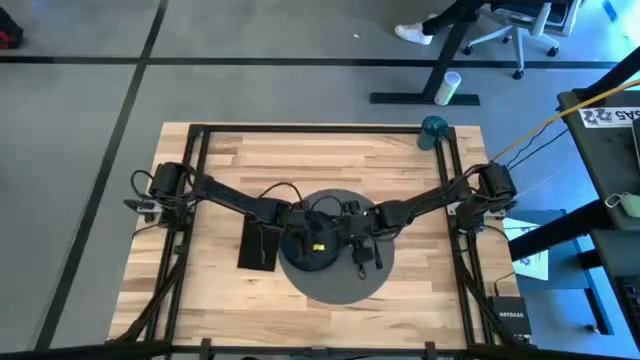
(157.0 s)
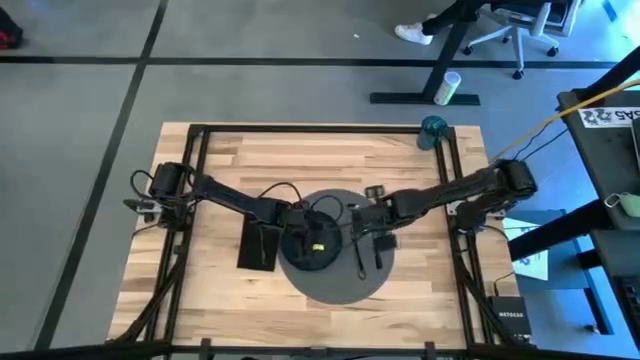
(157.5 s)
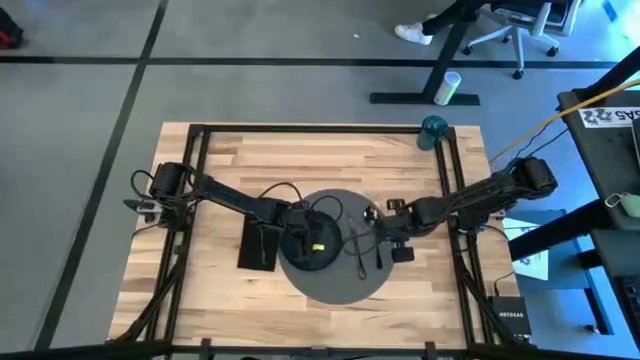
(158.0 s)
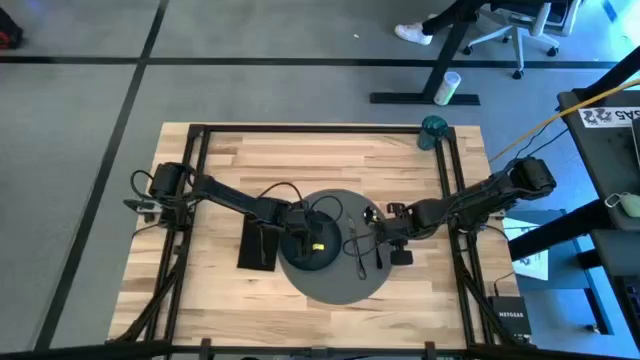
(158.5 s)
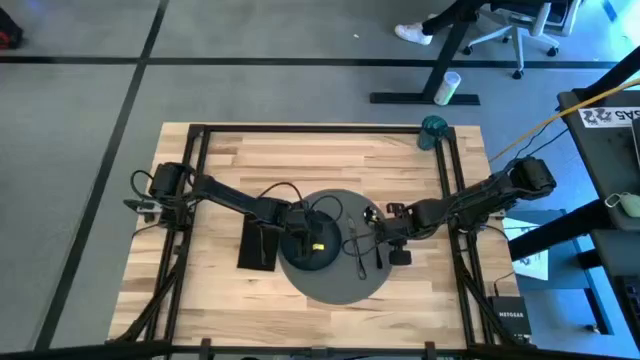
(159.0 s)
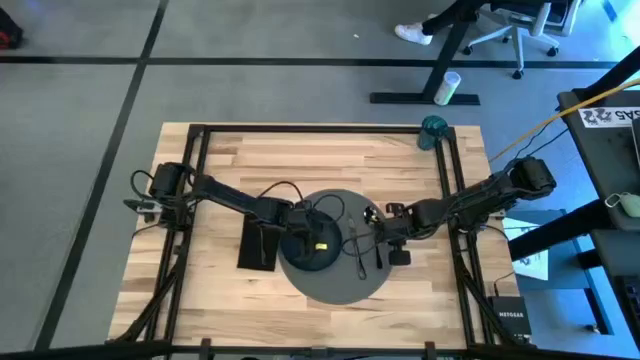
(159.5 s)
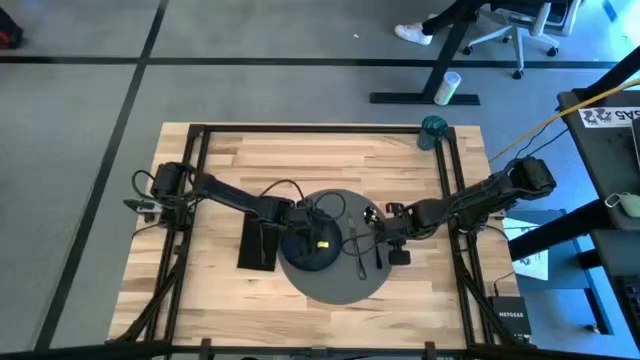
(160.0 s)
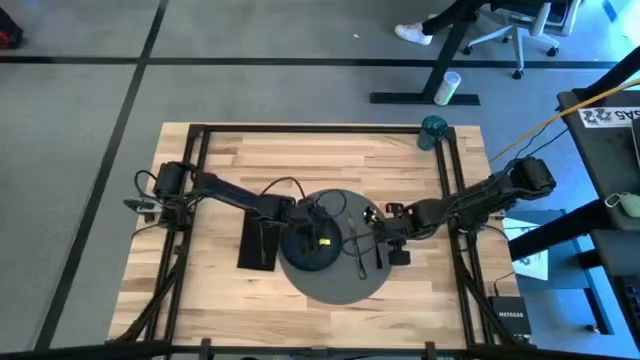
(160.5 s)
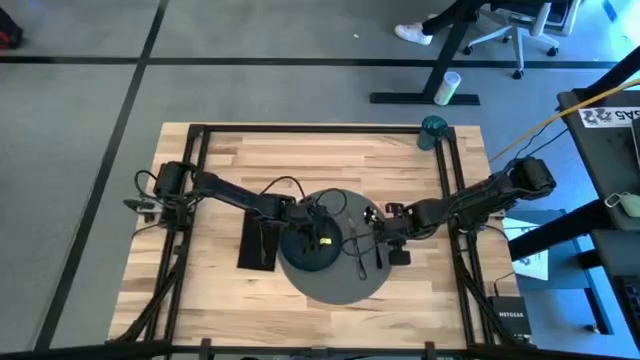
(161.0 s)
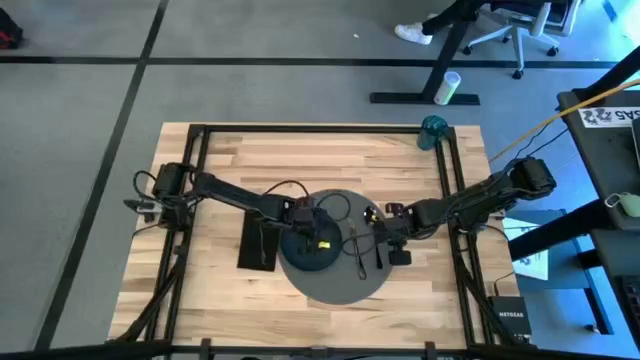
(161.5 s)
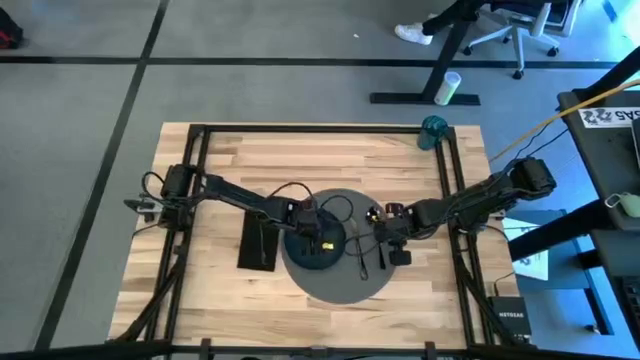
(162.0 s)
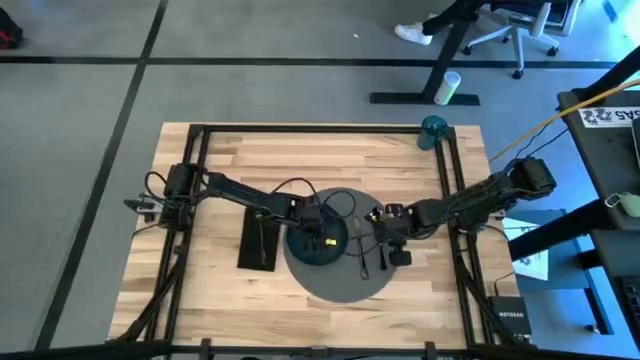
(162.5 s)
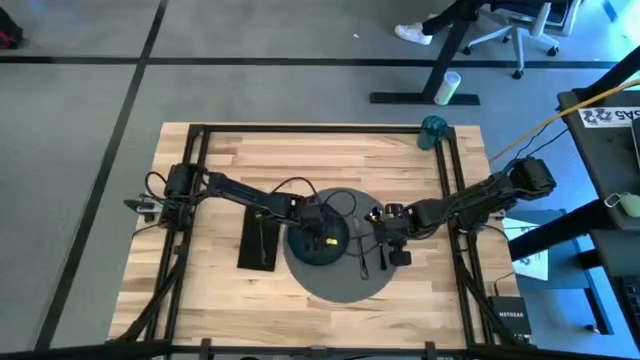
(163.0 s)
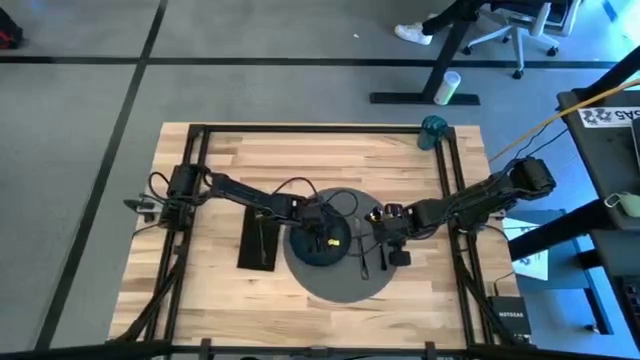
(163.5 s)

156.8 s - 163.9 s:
Task: Set table place
Adjust the dark blue plate on the gray table mat

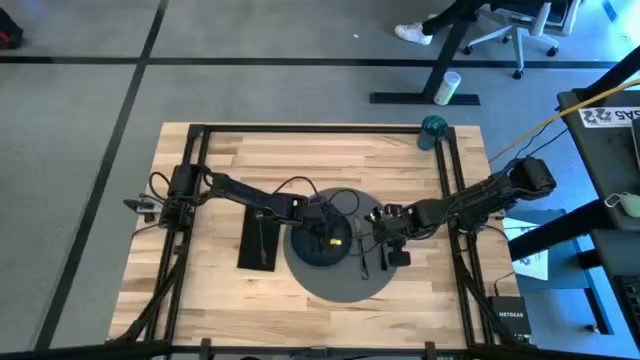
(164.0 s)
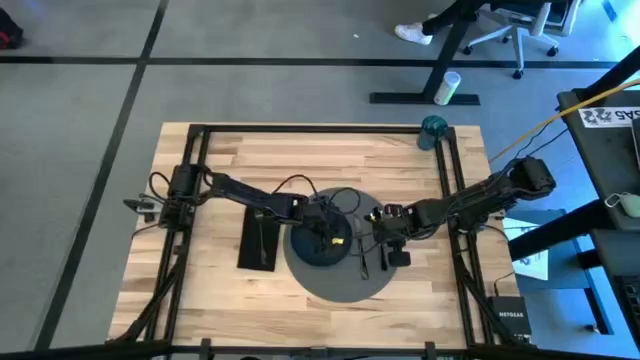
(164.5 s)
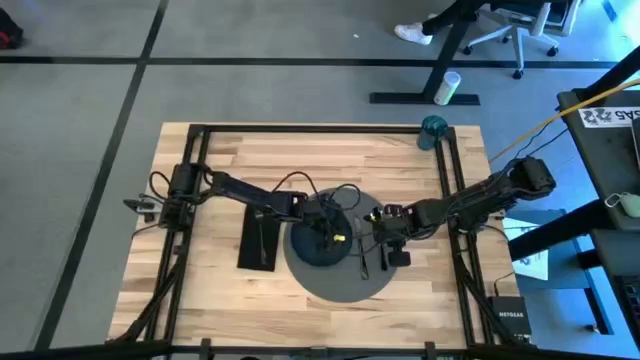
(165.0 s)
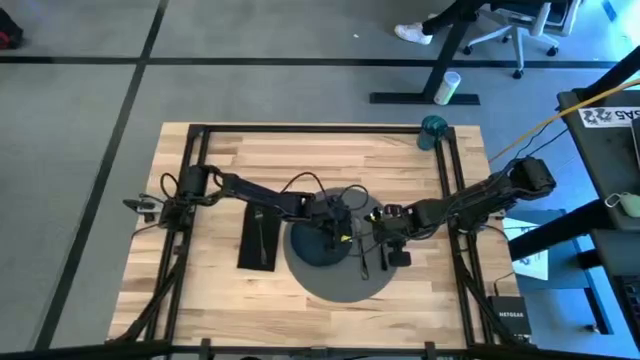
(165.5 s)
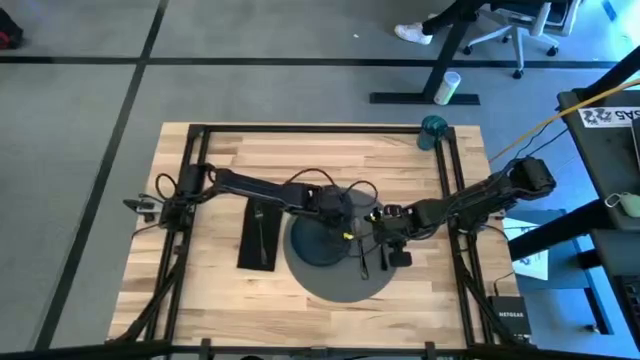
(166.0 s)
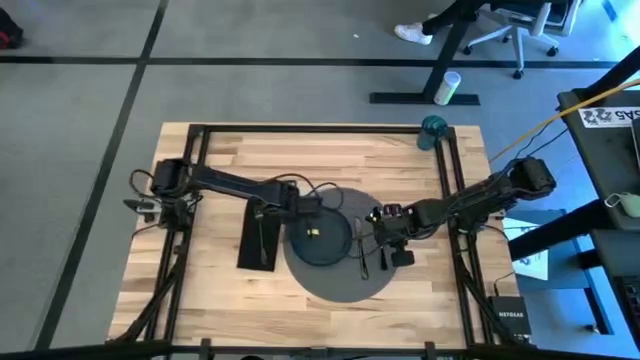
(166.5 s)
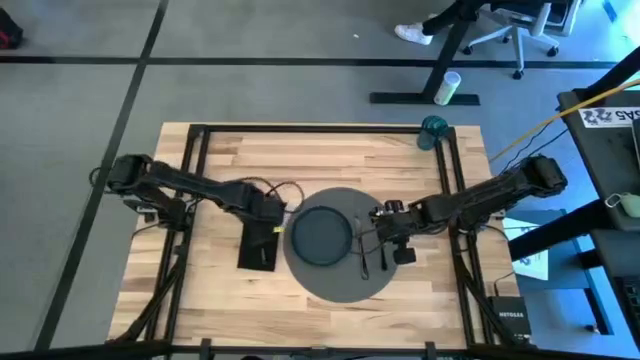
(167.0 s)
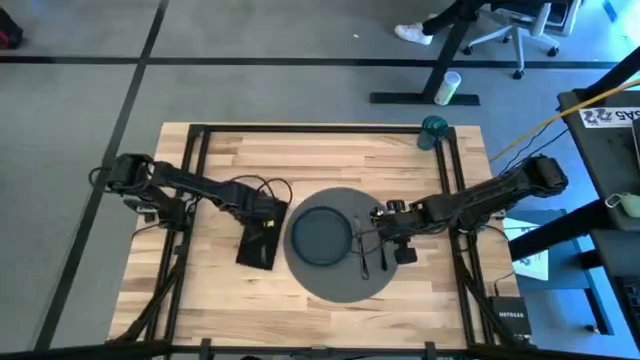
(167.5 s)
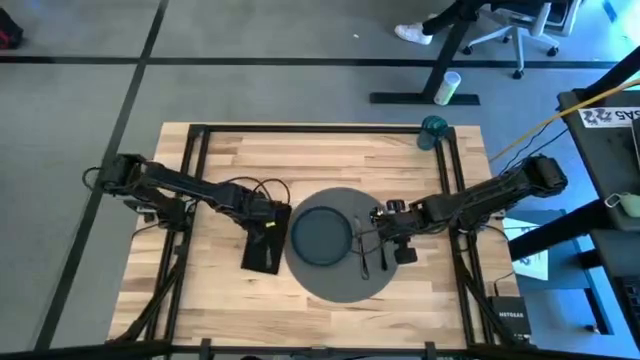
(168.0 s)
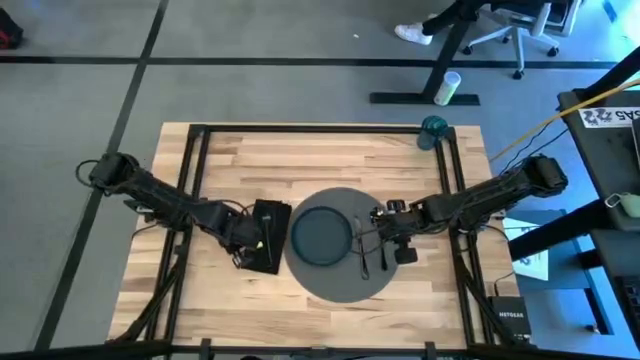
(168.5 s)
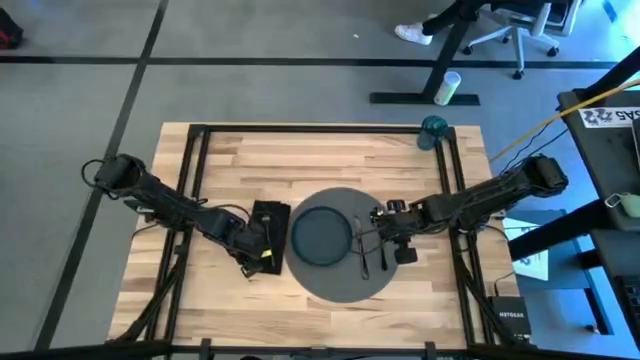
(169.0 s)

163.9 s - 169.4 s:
Adjust the black table napkin

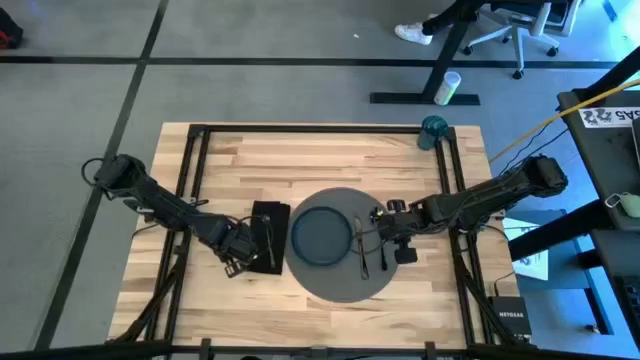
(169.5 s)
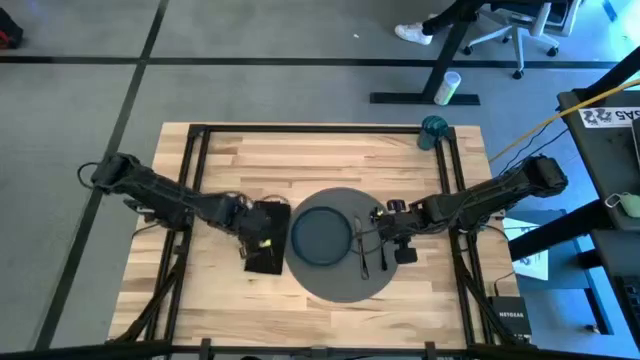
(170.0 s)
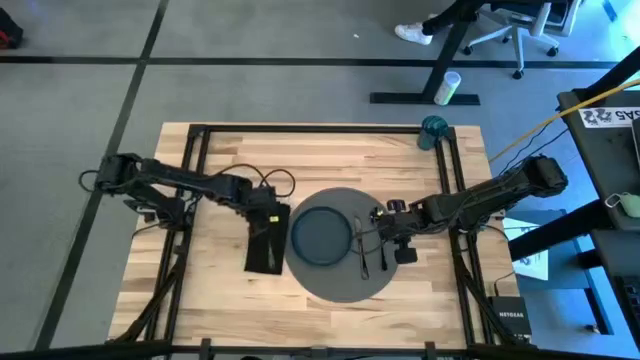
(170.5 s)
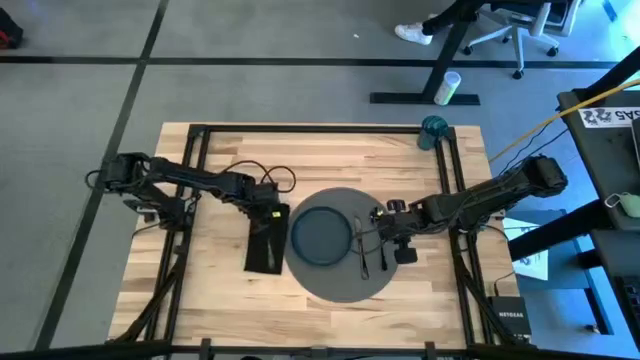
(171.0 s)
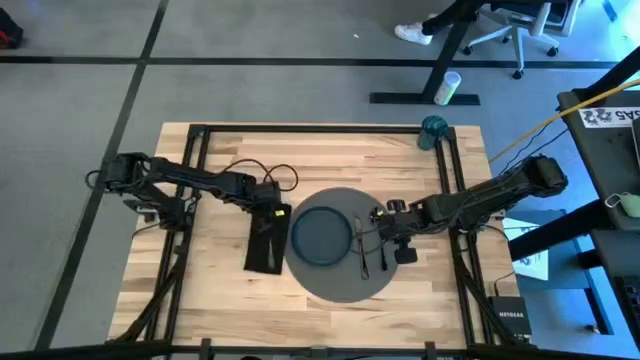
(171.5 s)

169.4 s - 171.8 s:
Adjust the black fork on the black table napkin

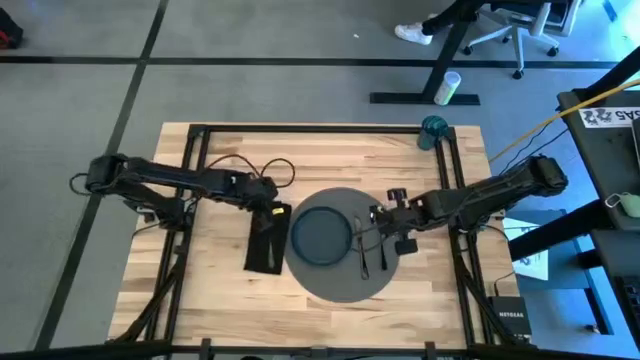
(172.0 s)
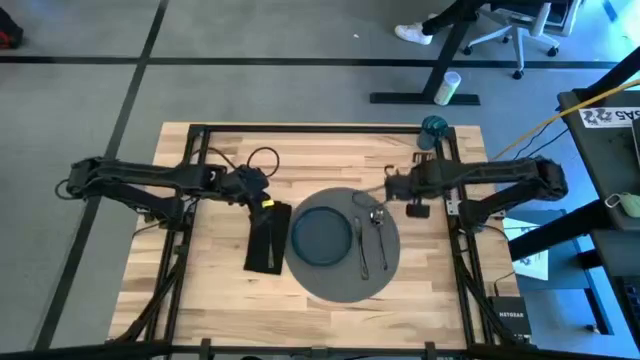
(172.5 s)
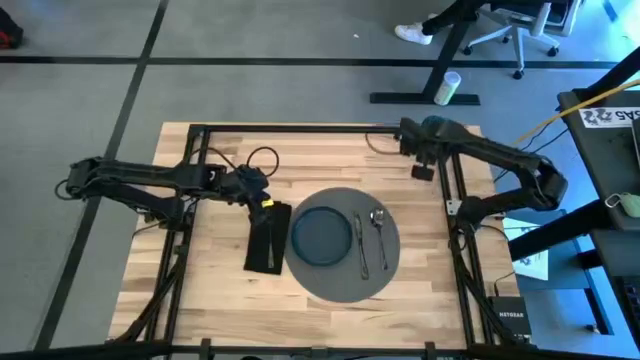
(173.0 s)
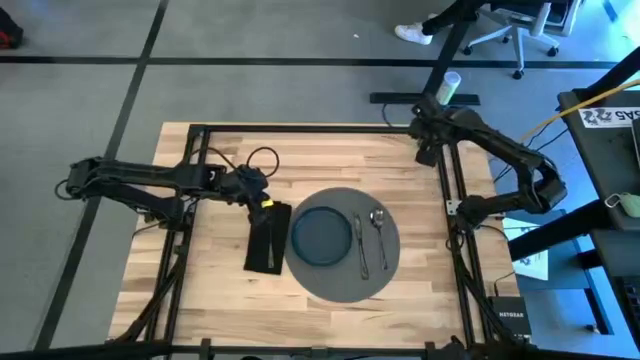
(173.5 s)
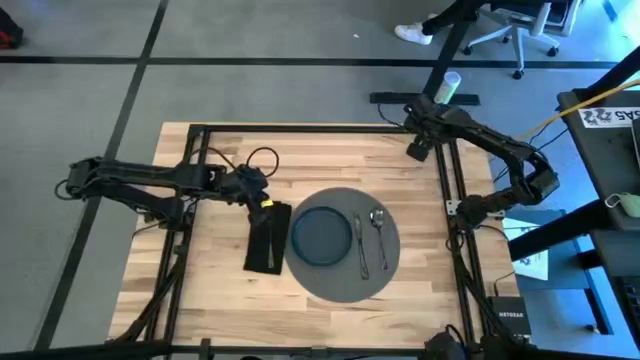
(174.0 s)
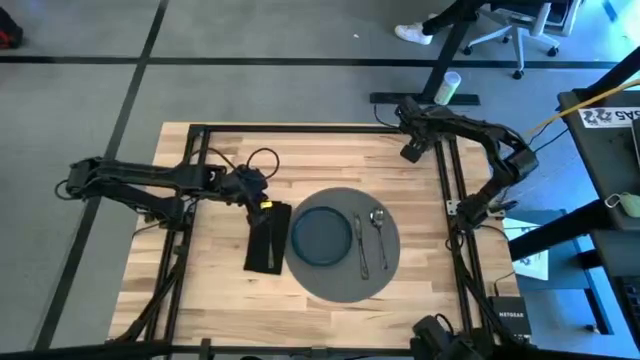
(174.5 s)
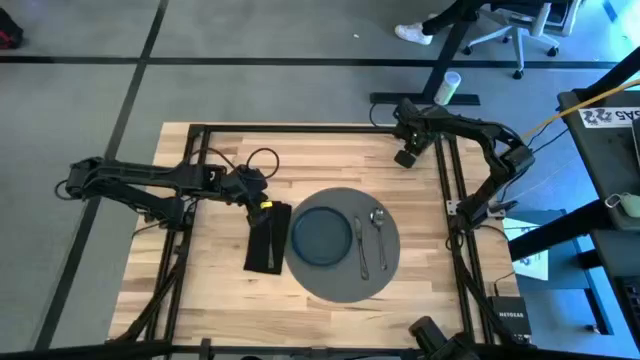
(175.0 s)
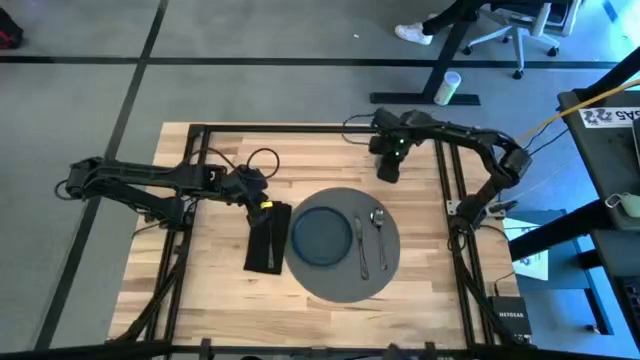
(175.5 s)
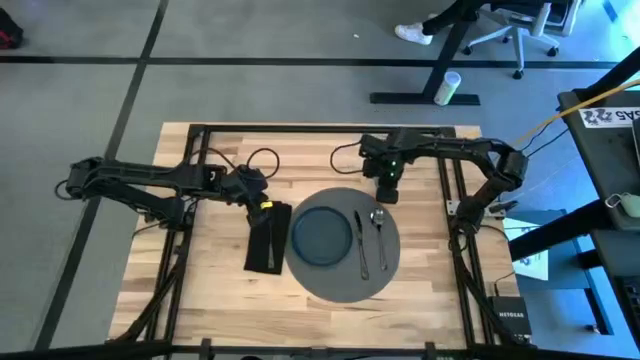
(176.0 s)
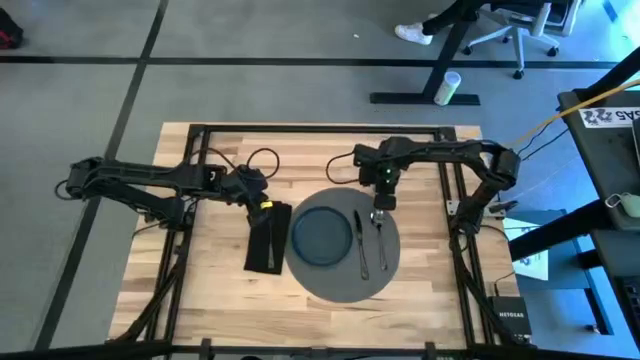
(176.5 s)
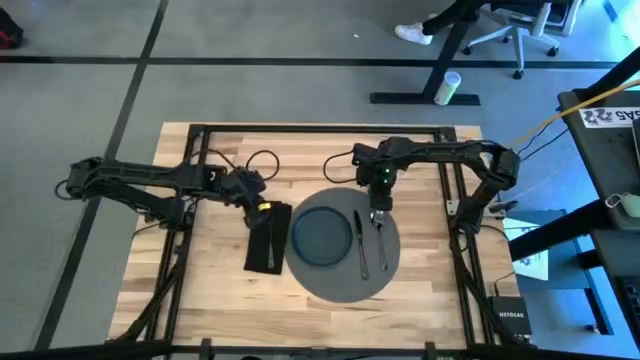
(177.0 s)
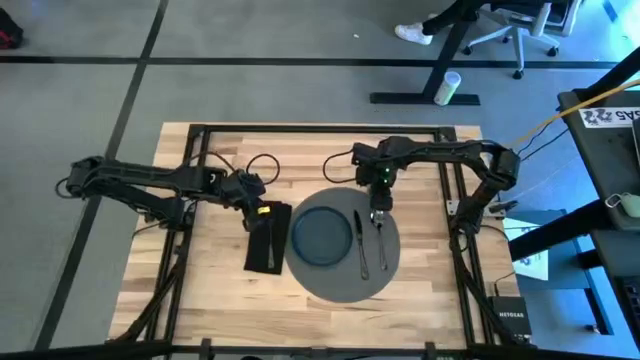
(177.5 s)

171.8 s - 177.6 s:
Move the blue cup to the top right of the table
